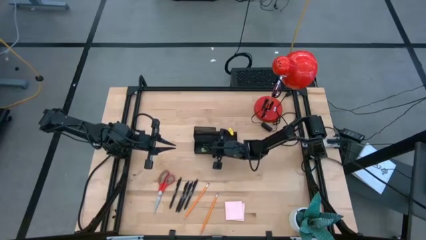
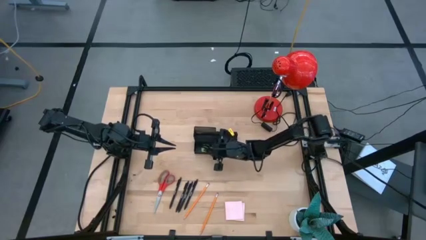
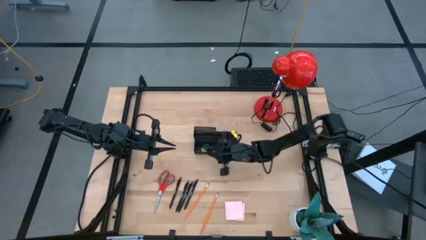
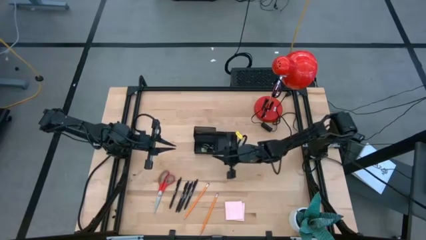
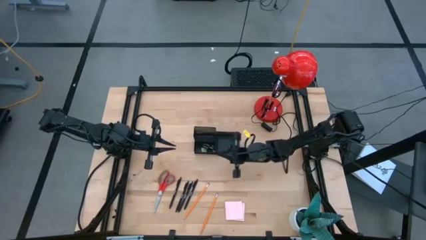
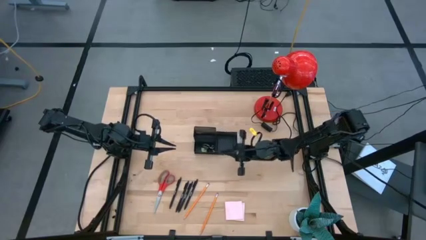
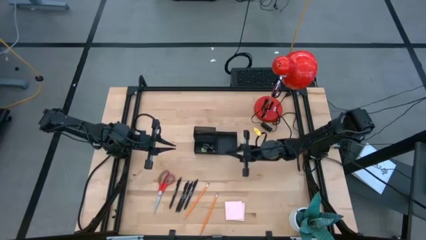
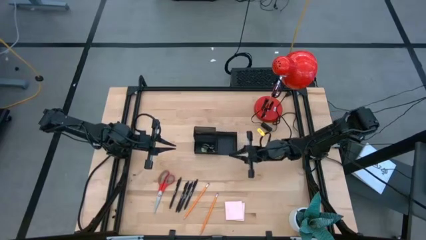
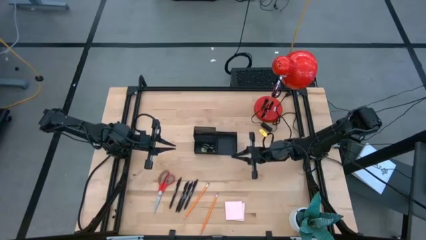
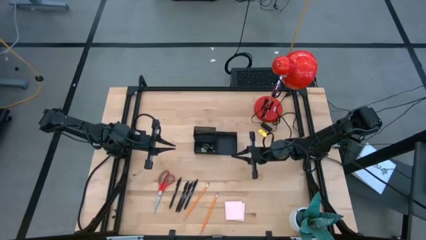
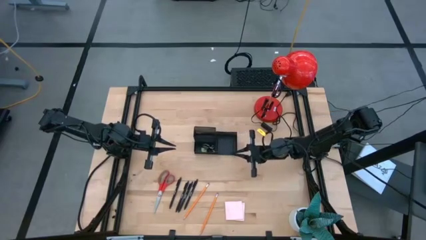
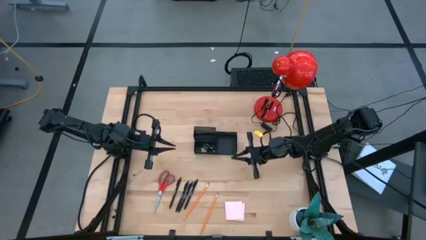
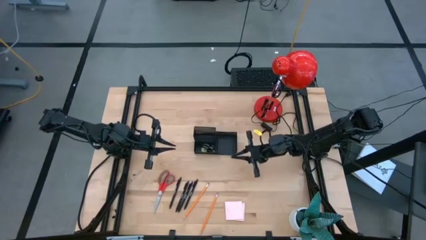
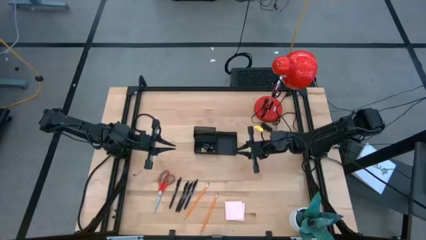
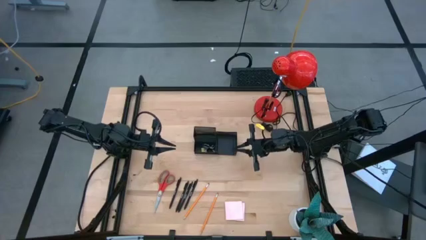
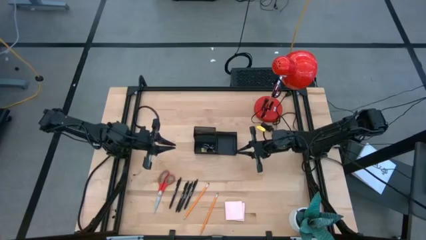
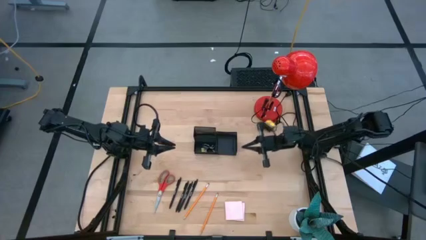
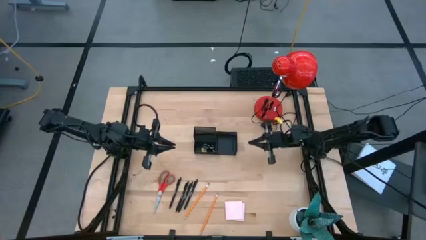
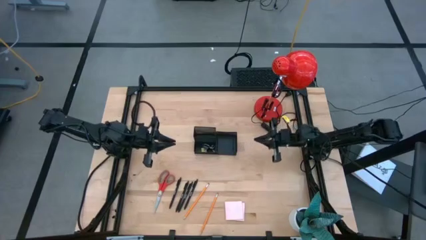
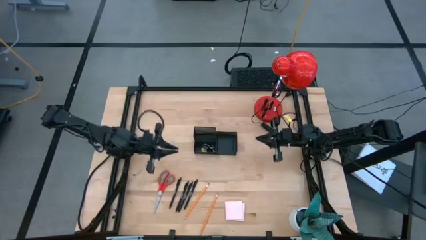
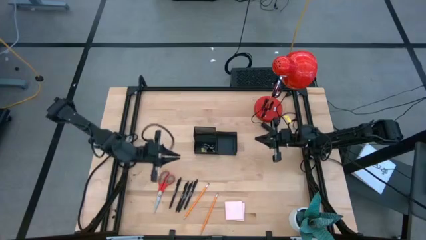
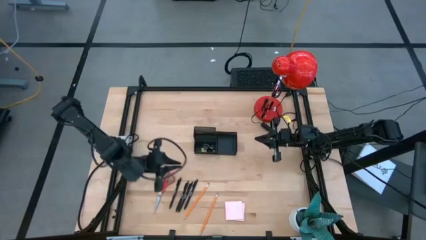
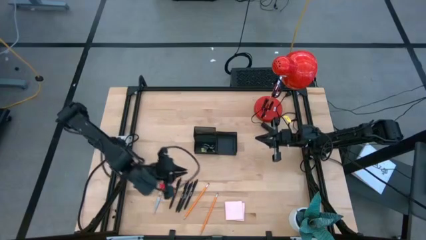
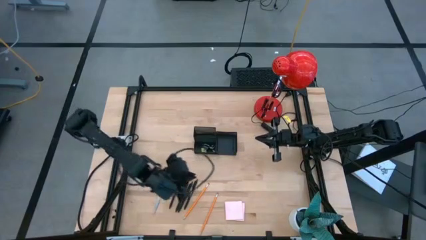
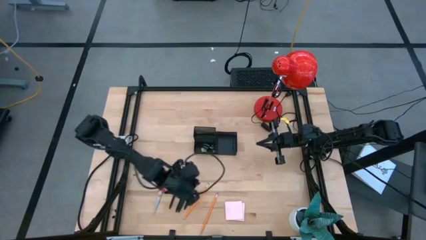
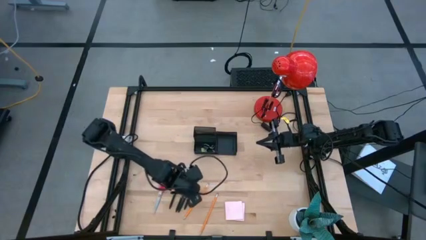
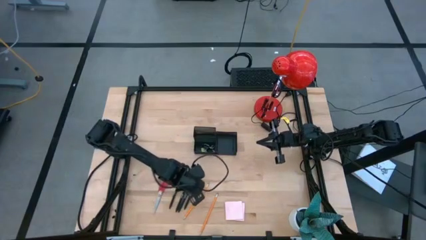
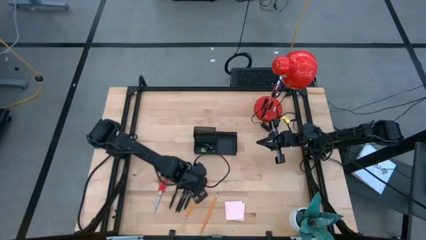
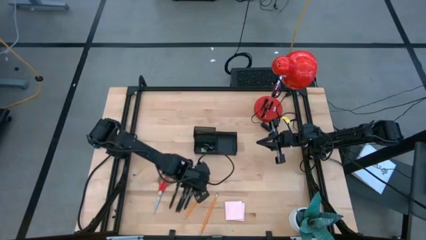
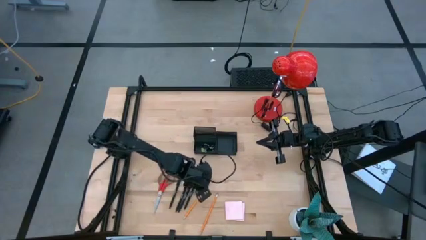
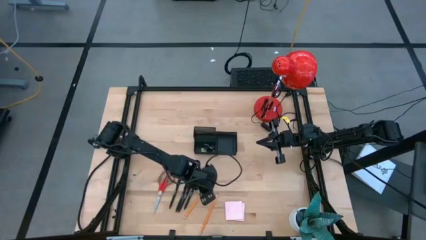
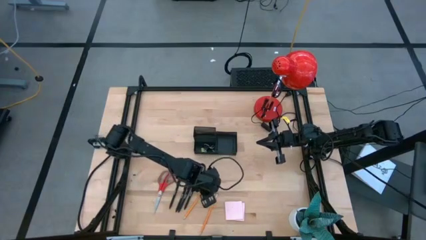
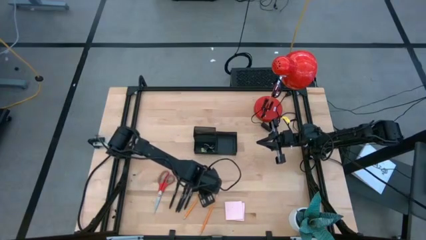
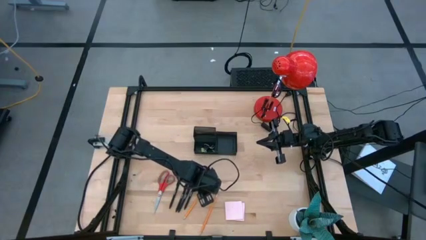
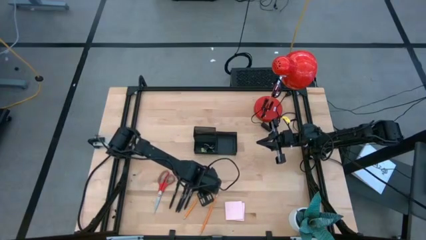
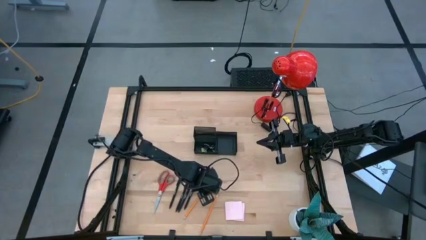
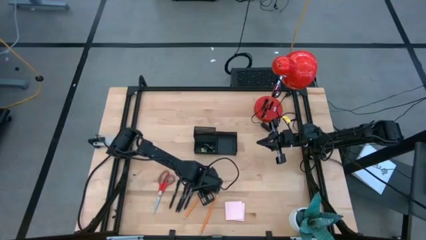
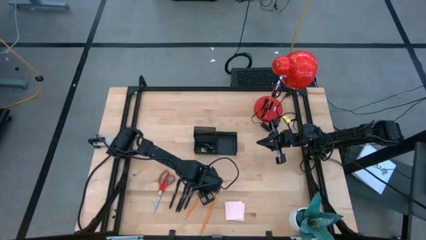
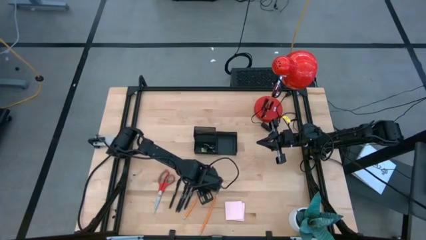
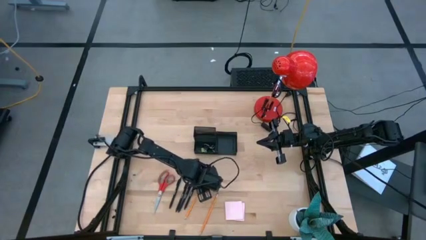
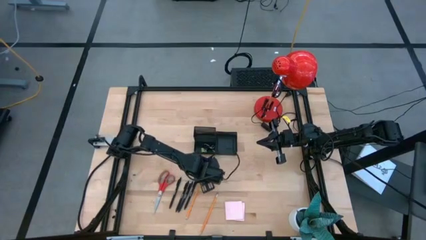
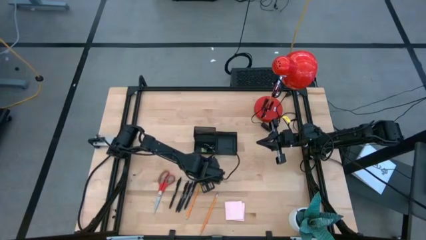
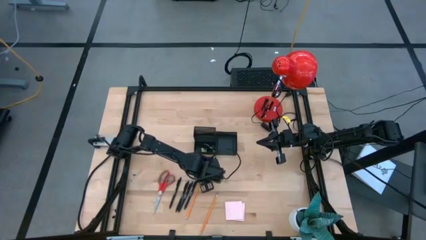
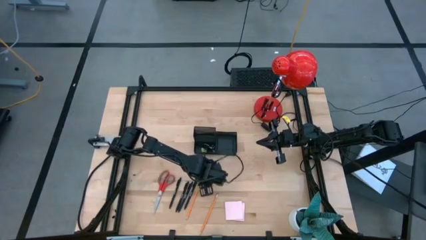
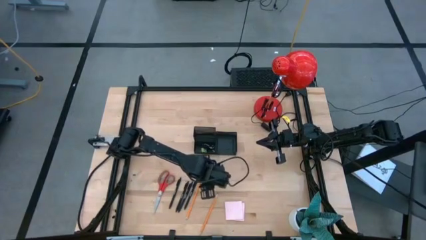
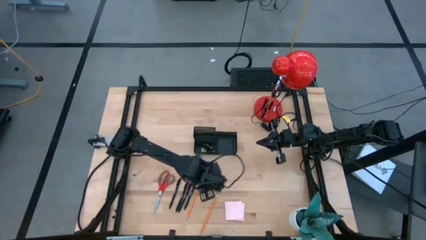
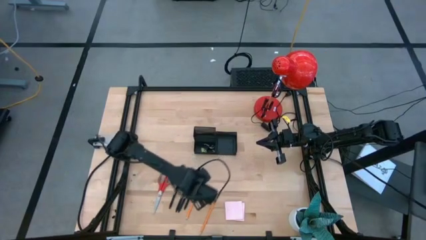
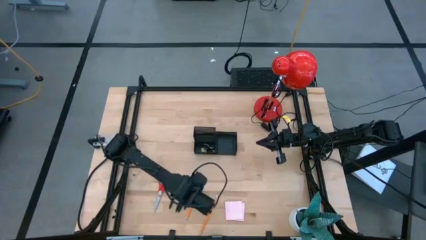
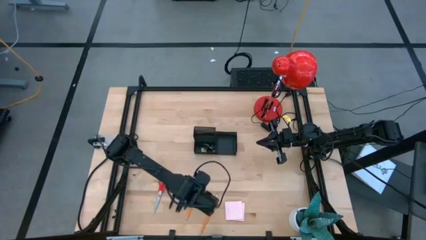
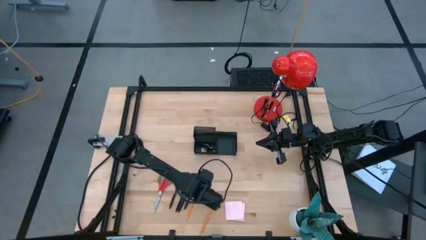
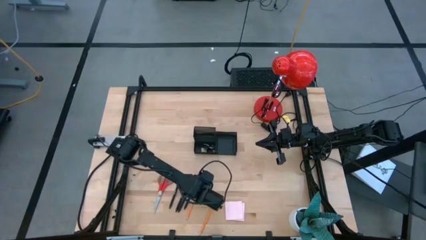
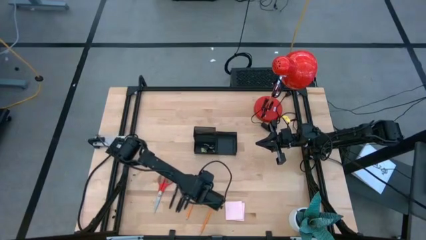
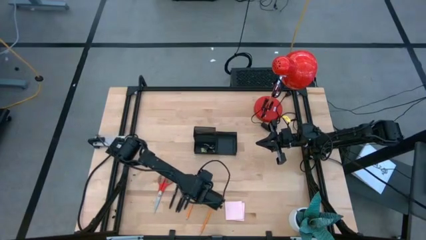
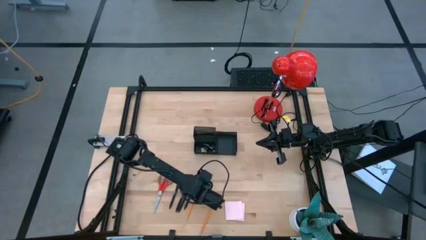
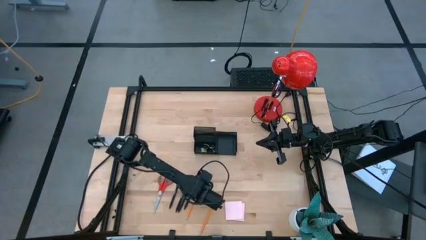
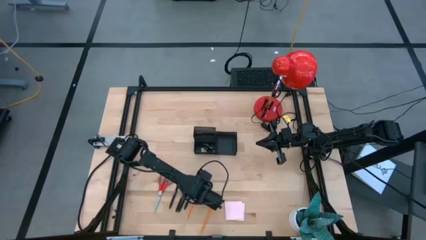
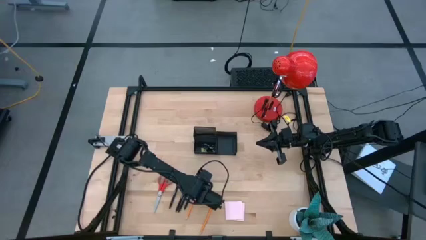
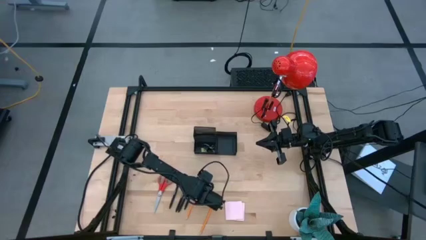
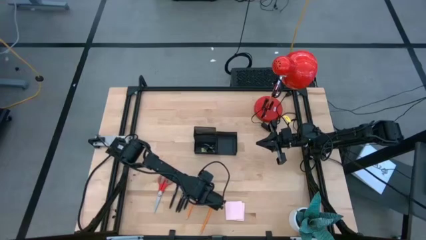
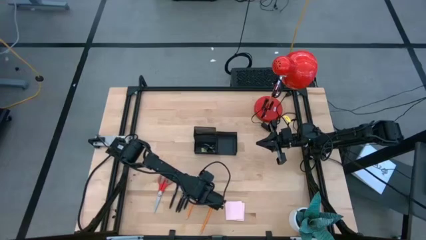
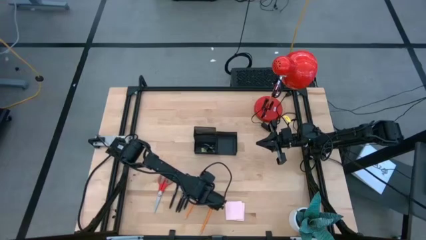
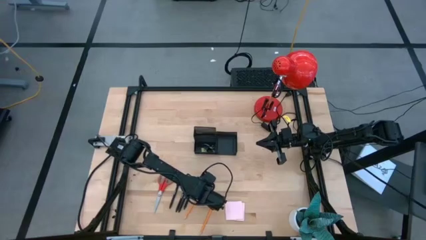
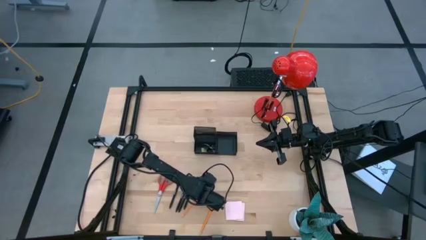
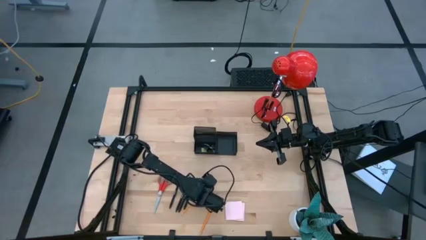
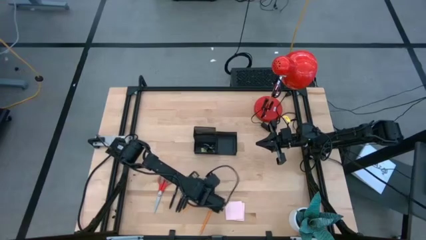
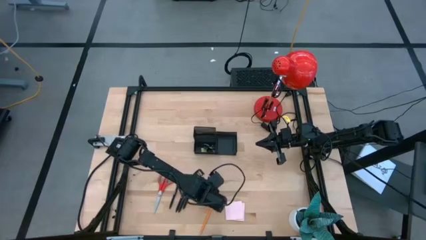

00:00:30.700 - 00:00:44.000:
Task: Pick and place office supplies into organizer
Put the left pencil into the desk organizer
